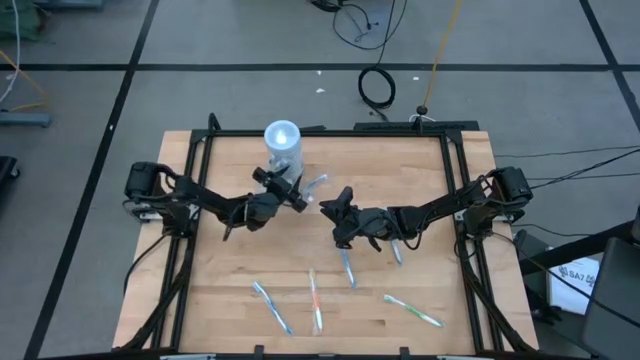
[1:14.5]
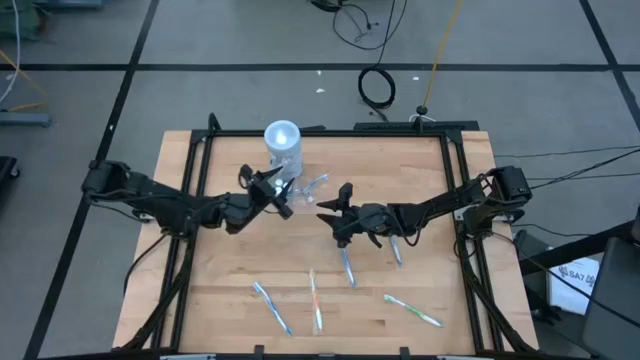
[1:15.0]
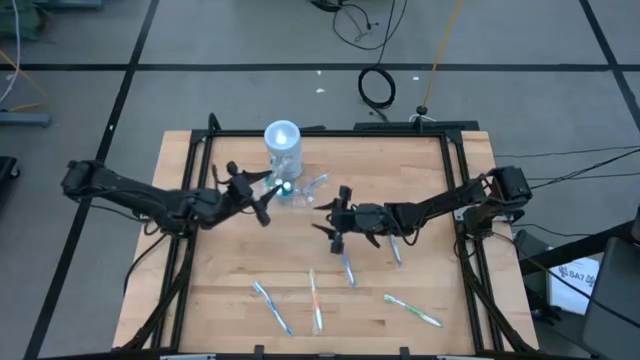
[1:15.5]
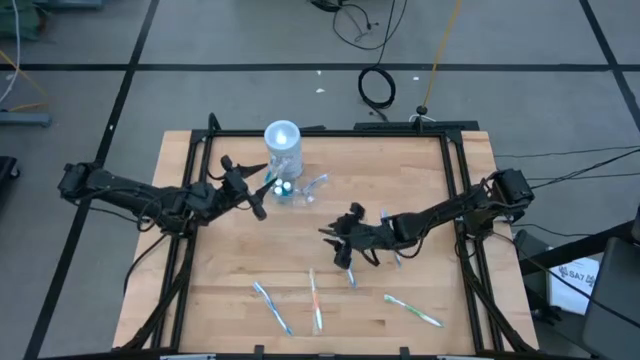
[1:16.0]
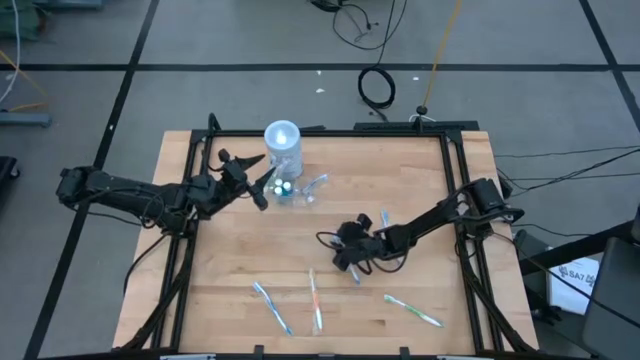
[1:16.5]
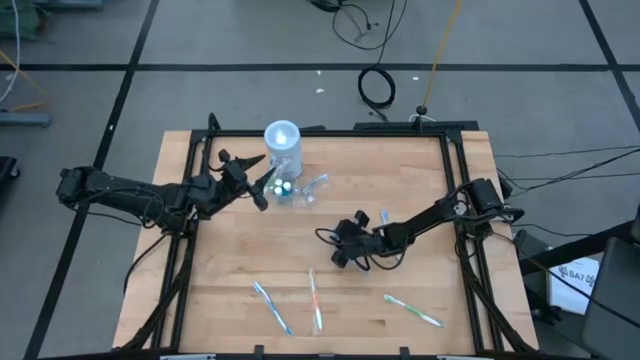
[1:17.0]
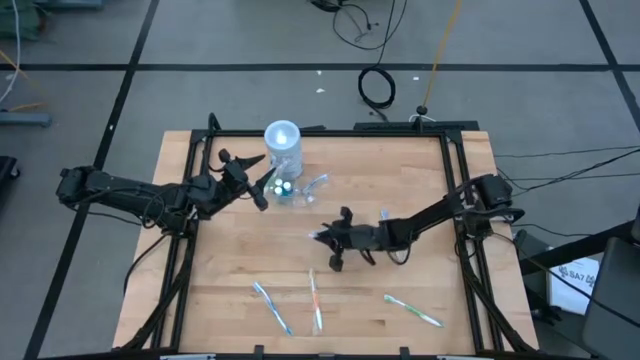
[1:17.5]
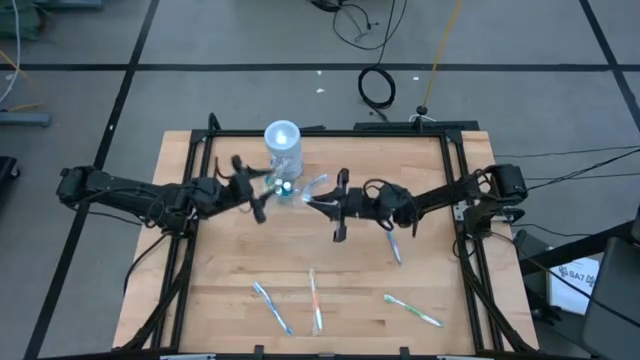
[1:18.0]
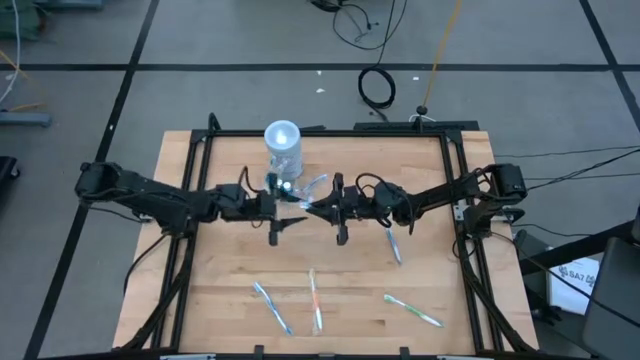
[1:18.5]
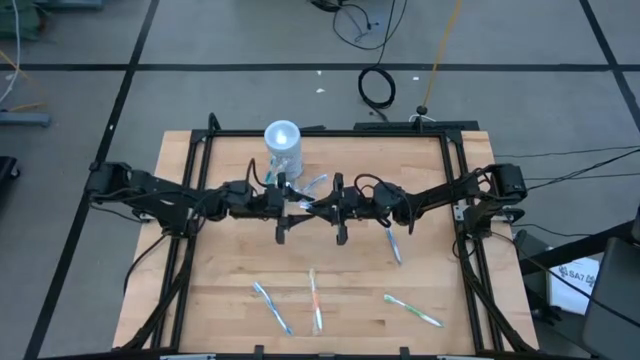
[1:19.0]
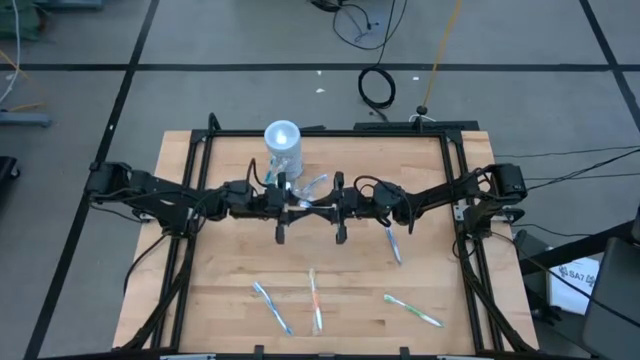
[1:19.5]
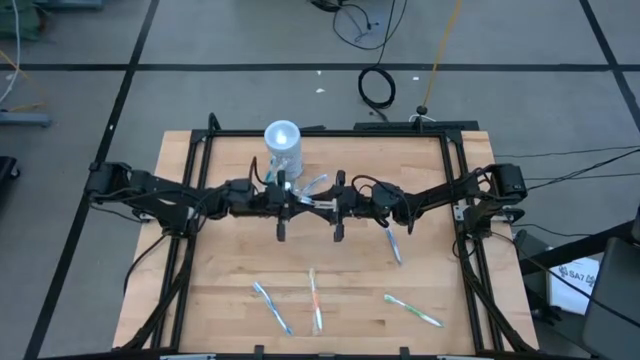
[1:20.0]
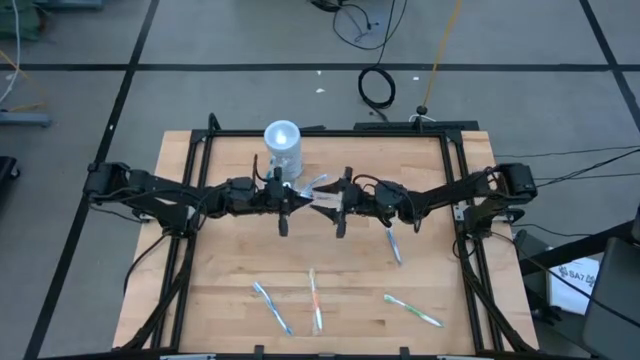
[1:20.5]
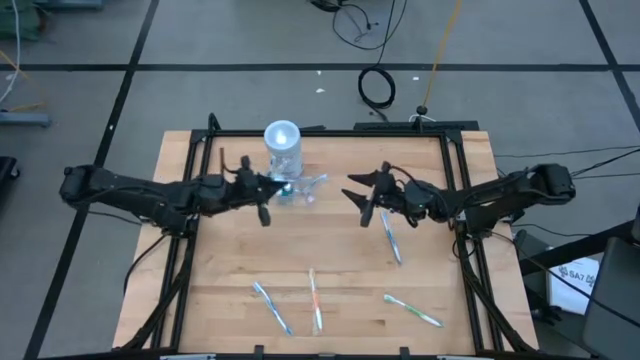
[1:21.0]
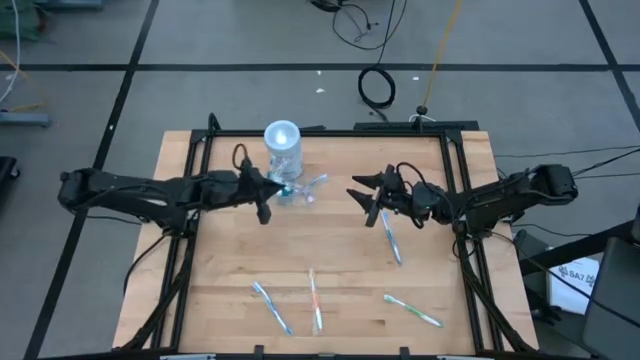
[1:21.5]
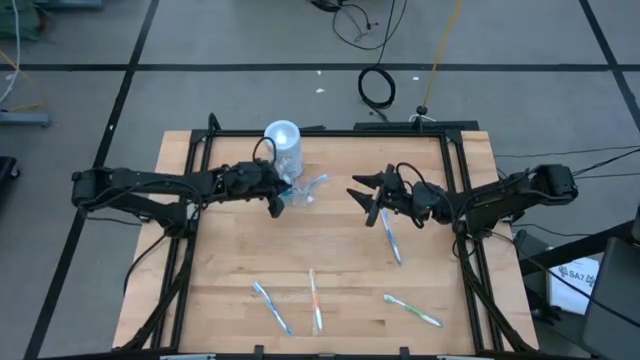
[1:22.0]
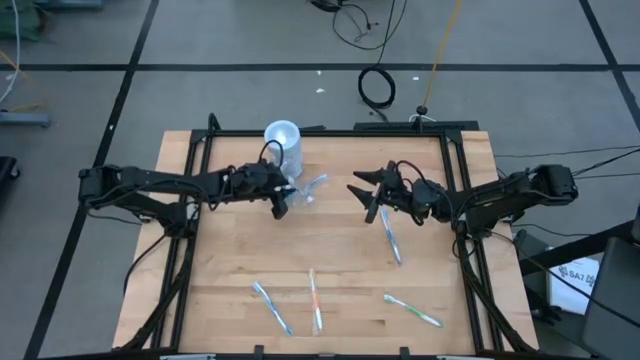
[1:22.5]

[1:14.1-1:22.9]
Task: Pick & Place toothbrushing station
Put the blue toothbrush into the transparent organizer

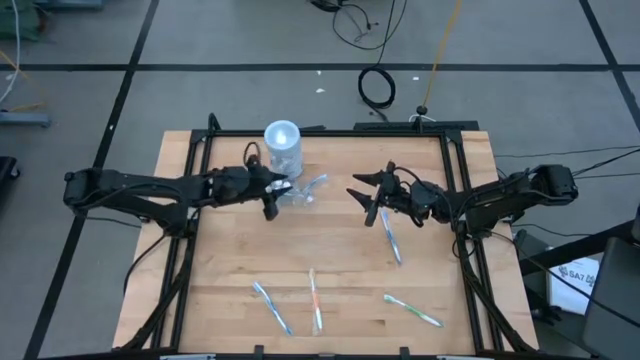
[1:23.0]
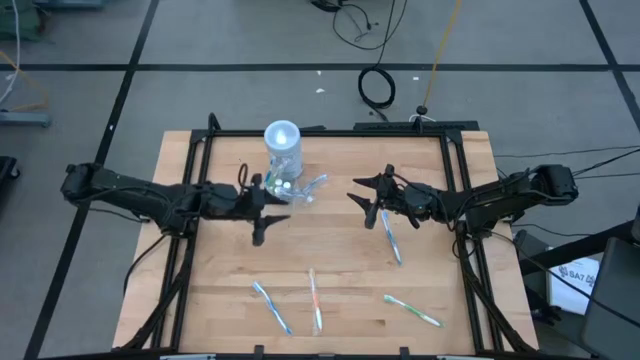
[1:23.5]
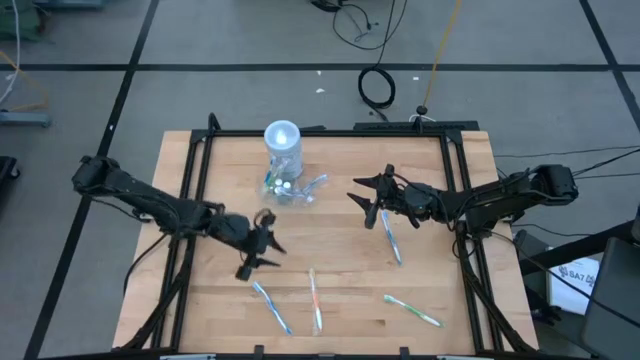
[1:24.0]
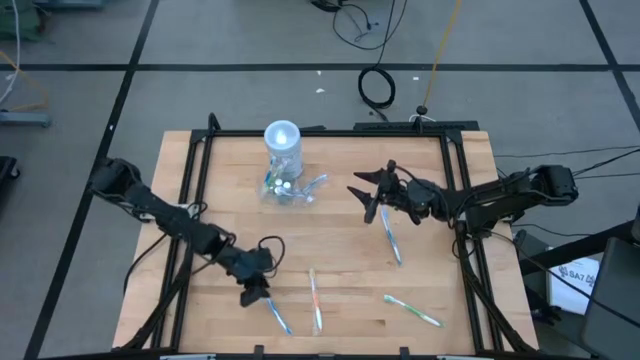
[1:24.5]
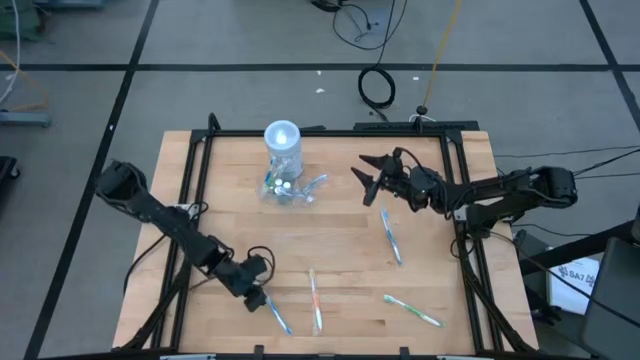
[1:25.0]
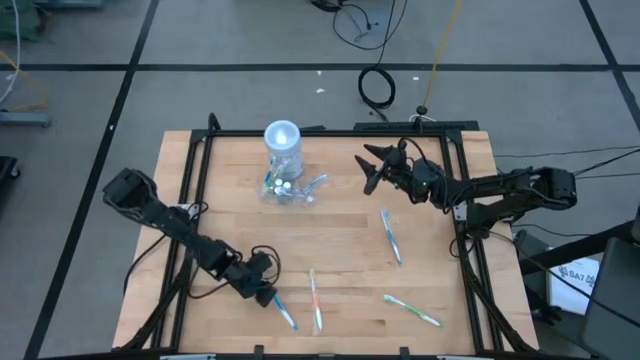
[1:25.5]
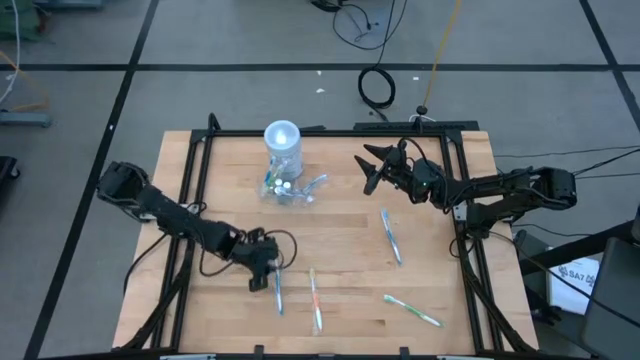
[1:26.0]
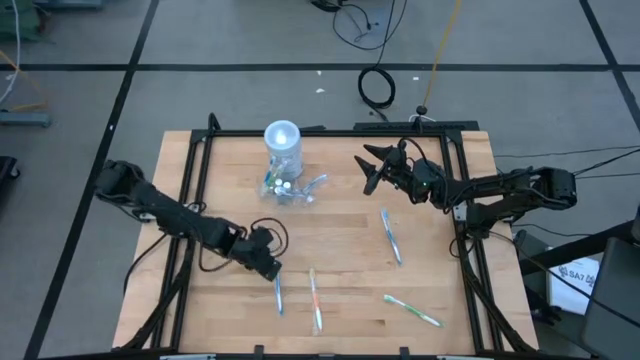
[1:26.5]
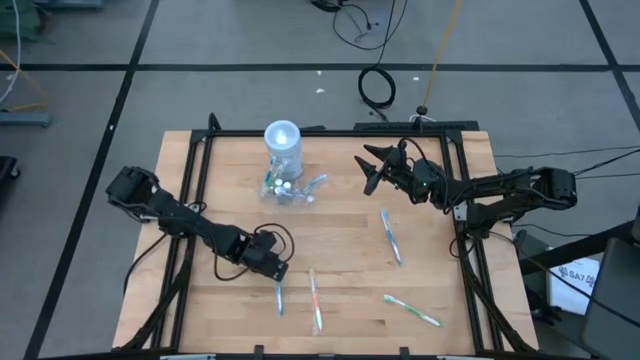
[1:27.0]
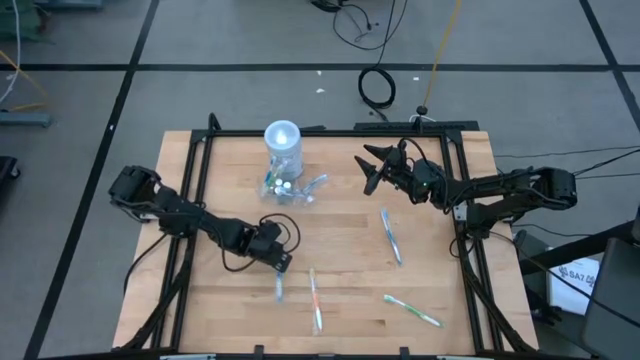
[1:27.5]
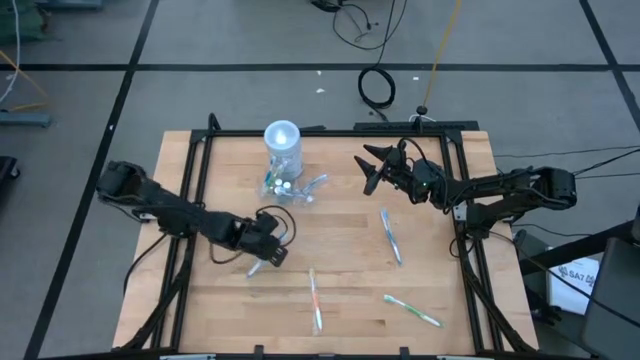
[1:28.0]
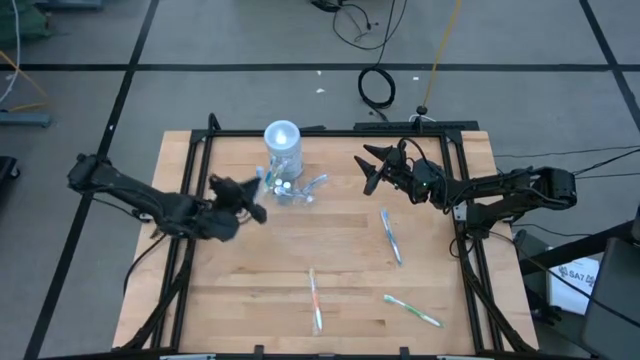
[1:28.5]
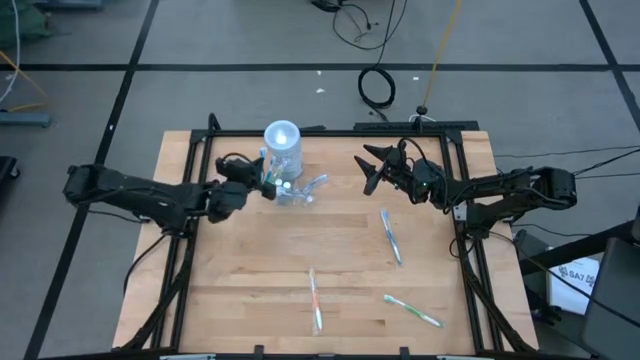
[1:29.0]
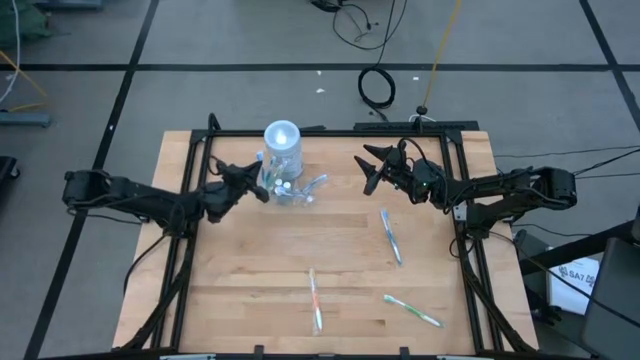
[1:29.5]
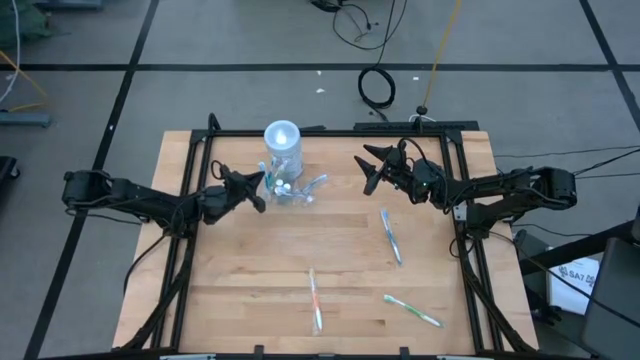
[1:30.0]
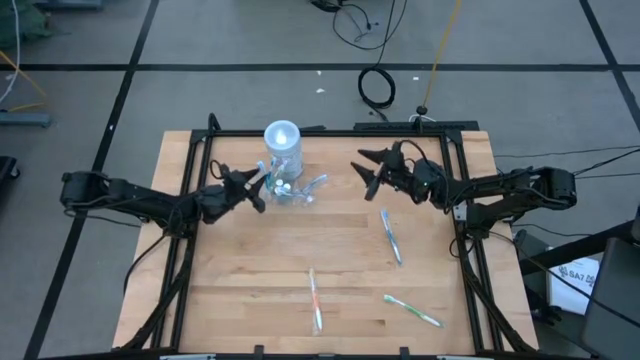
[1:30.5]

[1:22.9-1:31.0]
Put the blue toothbrush into the transparent organizer

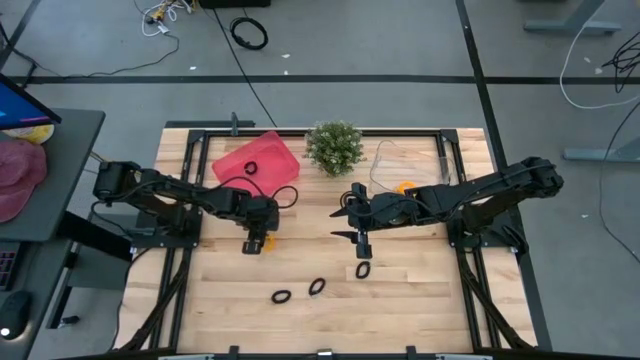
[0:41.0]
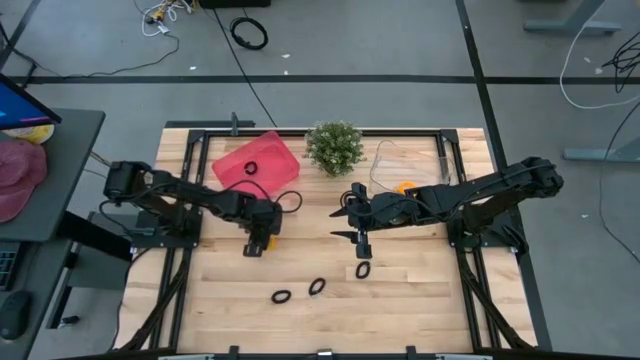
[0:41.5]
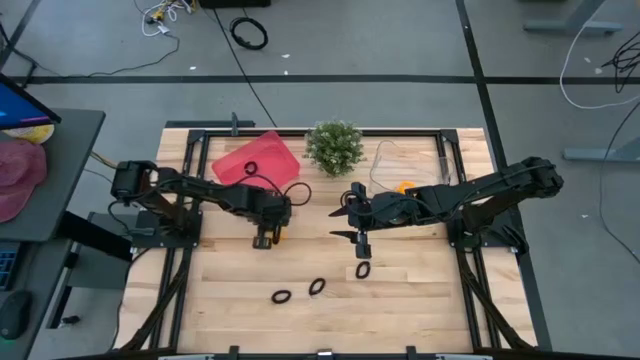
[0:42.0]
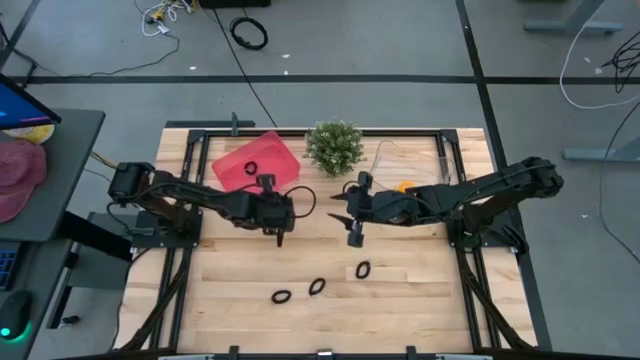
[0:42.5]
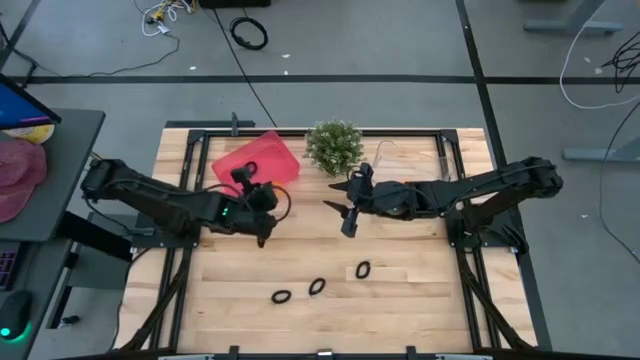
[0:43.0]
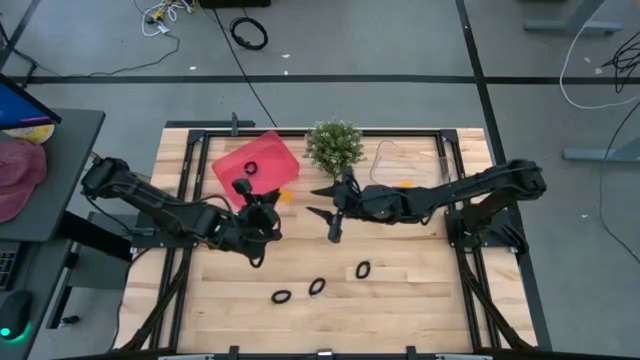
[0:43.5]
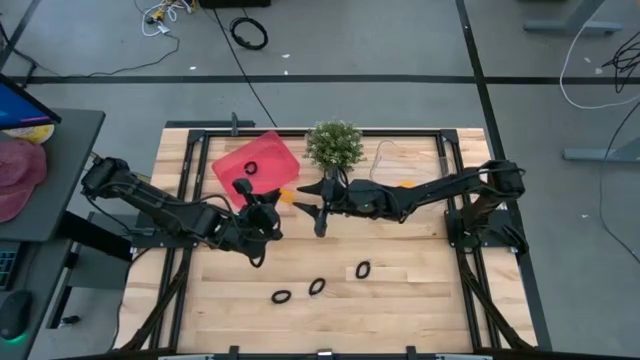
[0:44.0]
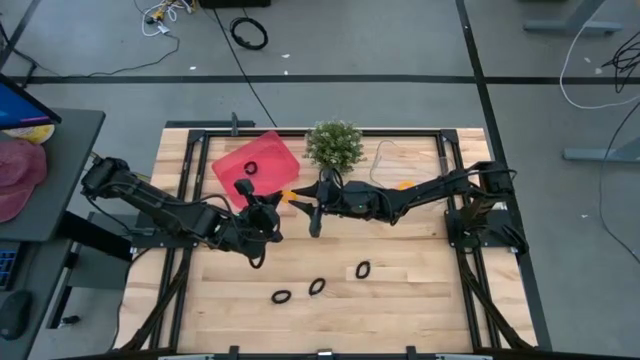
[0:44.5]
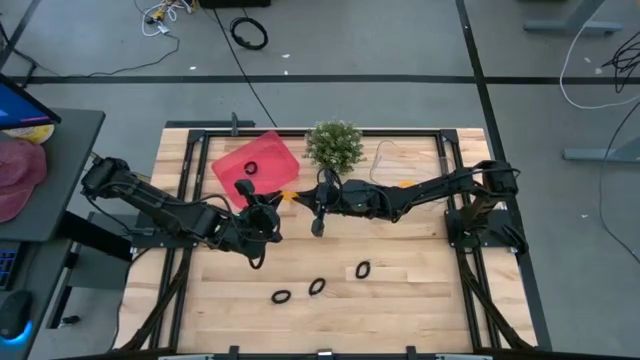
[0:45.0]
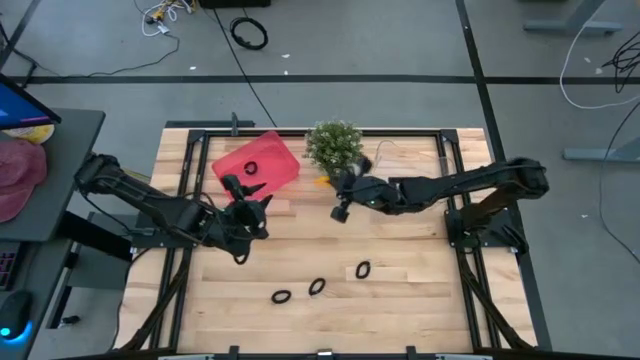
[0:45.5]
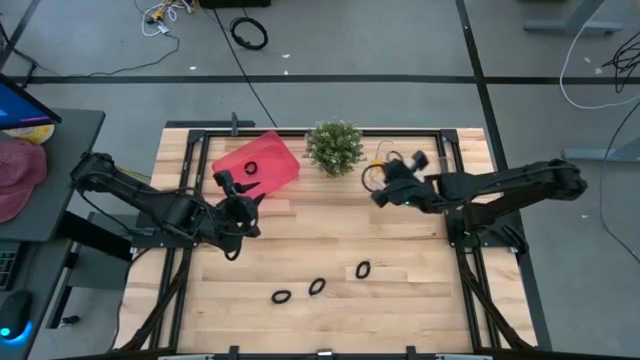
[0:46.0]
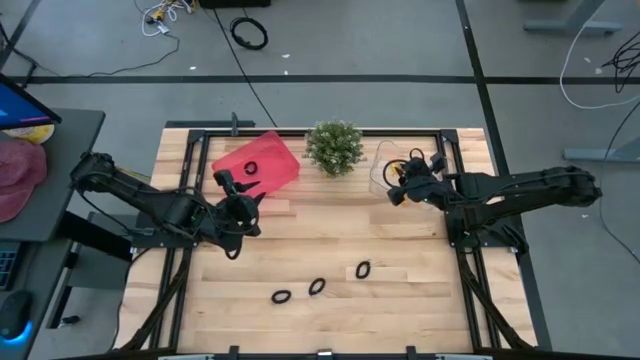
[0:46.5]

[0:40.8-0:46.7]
Task: Sort spring keychains
Put the orange spring keychain into the transparent bin
